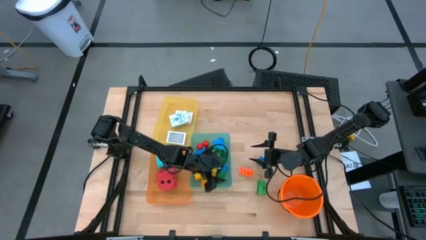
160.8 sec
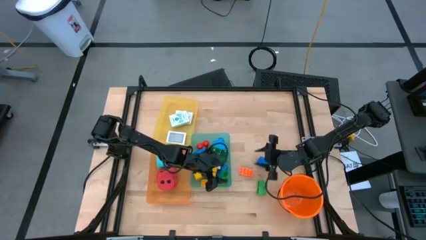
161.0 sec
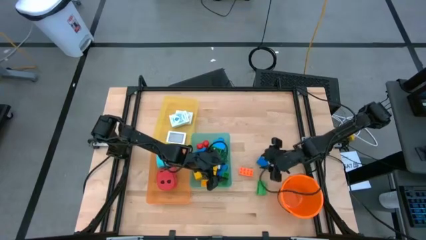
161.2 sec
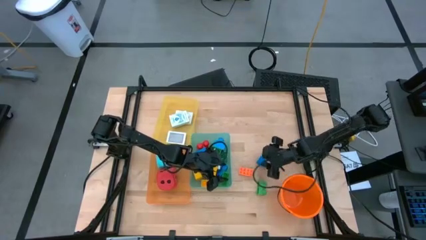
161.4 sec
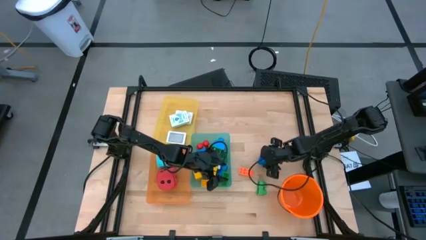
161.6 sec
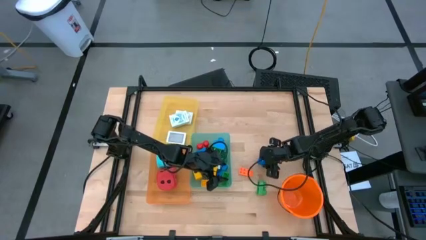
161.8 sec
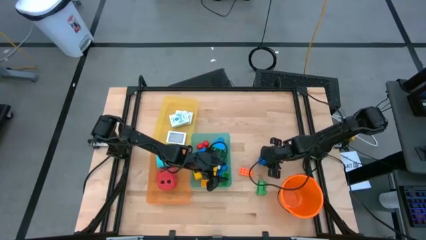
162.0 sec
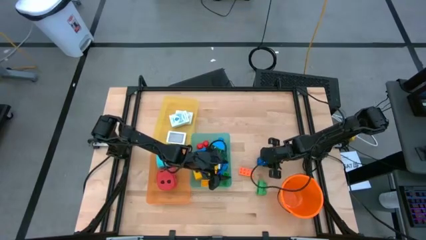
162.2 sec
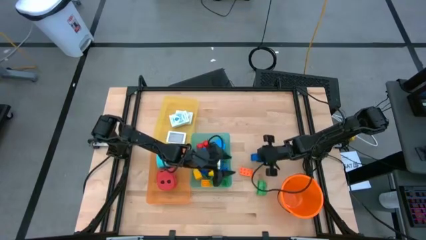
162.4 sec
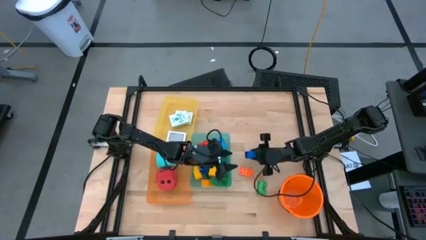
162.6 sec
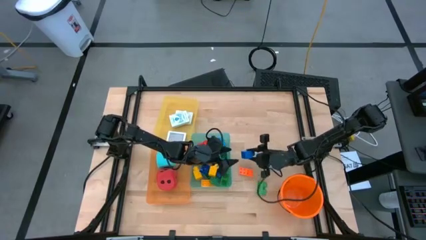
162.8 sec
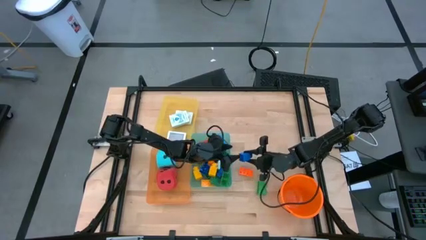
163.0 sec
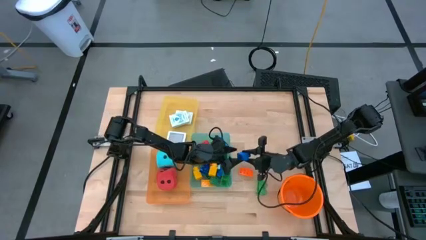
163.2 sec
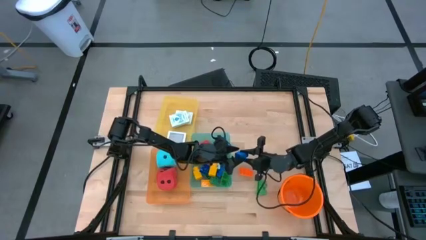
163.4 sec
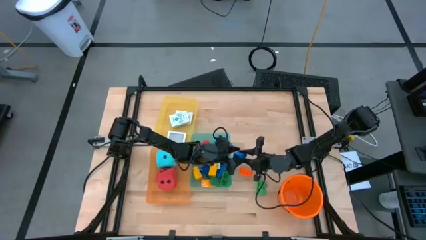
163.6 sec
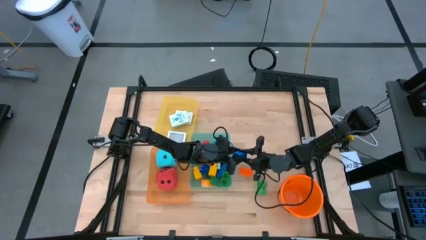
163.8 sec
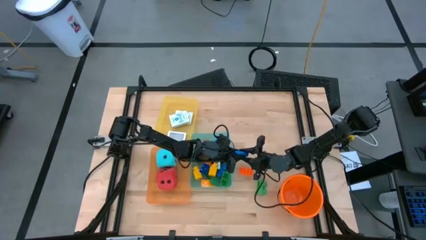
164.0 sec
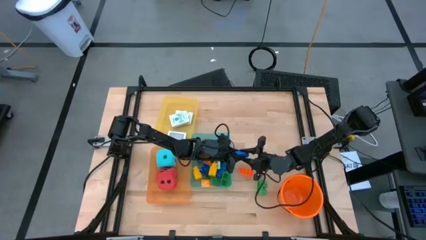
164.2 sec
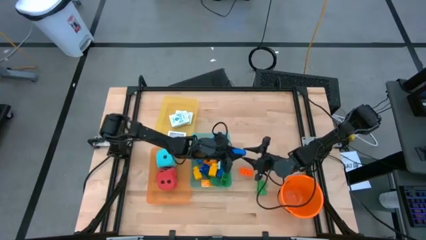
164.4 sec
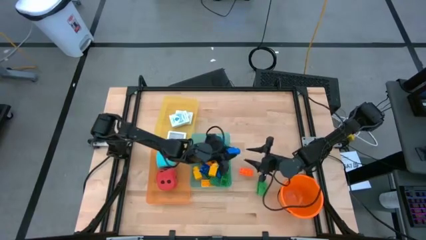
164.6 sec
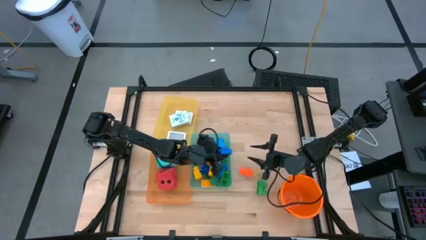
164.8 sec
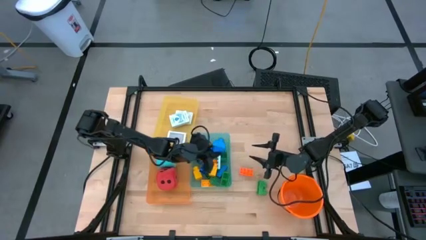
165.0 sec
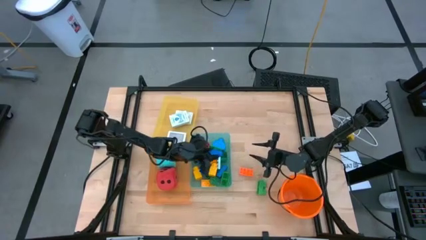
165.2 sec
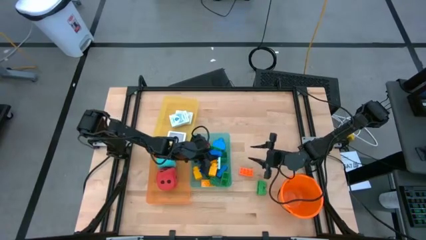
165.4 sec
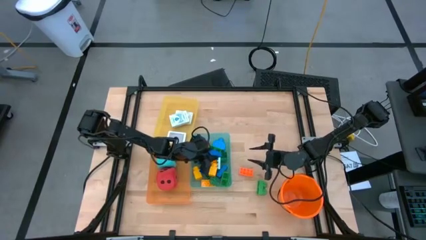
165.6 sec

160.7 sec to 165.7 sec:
Task: Pick & Place Toys
Put the blue game piece into the green bin

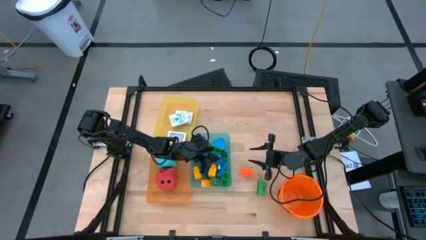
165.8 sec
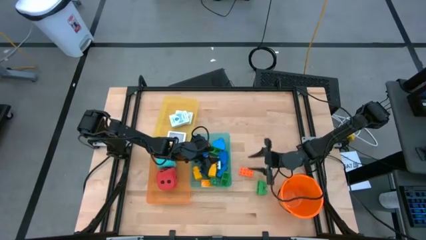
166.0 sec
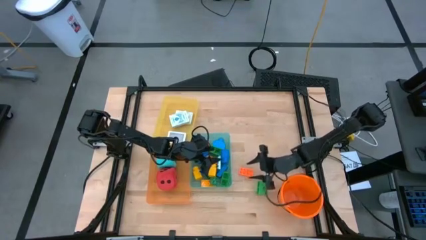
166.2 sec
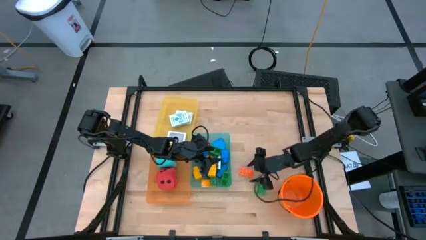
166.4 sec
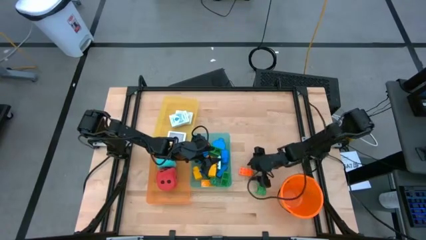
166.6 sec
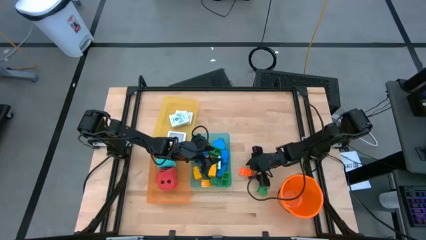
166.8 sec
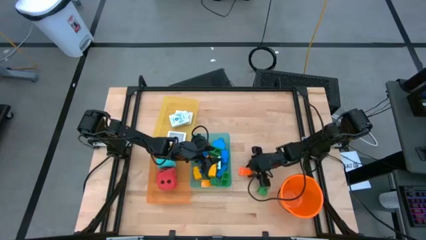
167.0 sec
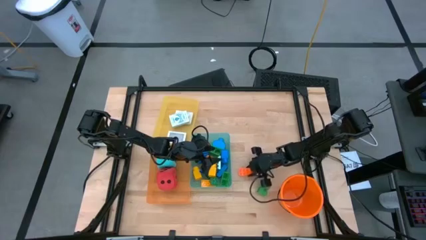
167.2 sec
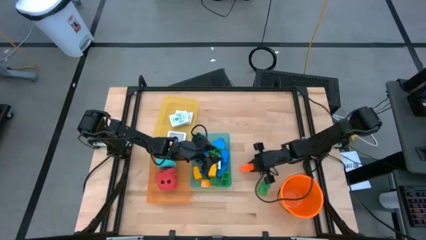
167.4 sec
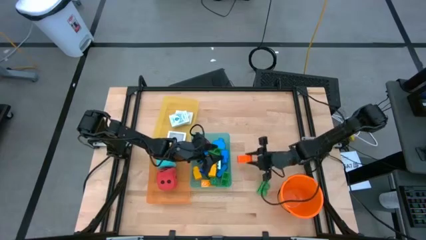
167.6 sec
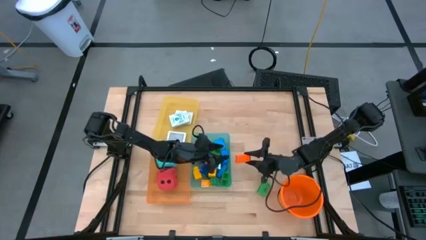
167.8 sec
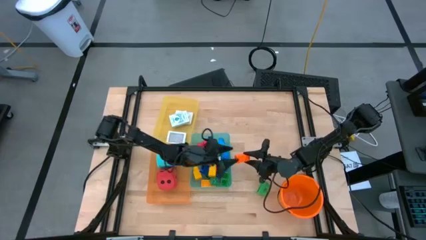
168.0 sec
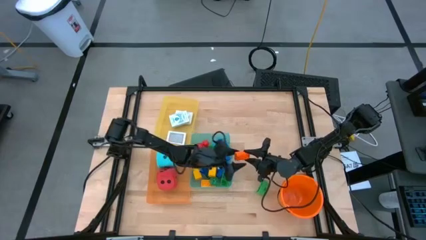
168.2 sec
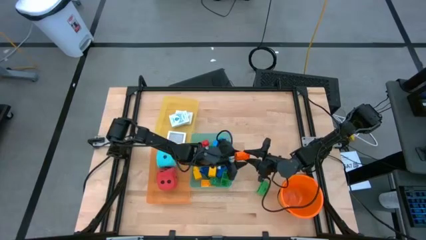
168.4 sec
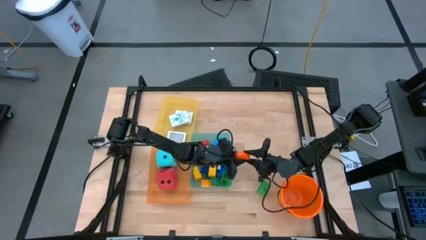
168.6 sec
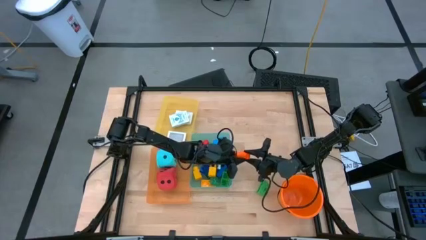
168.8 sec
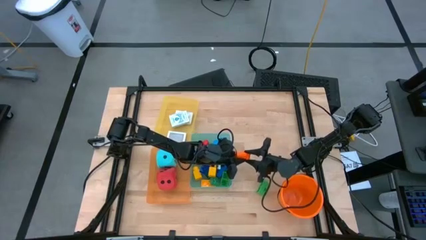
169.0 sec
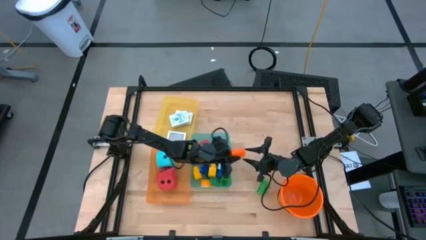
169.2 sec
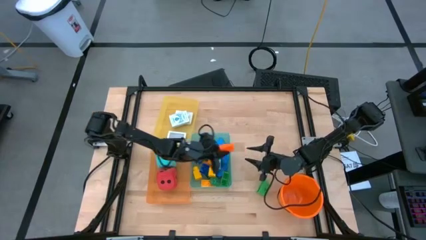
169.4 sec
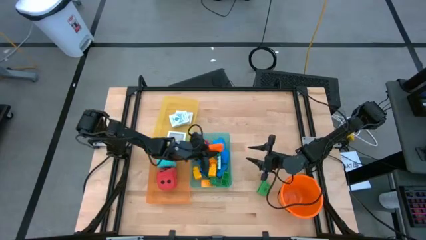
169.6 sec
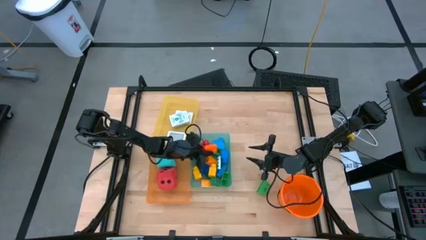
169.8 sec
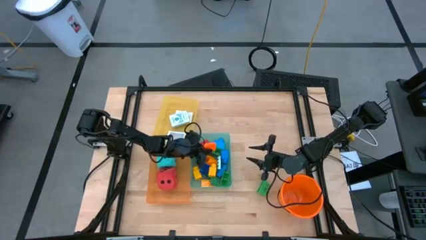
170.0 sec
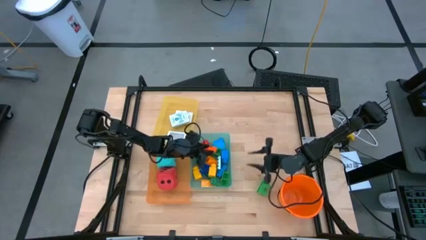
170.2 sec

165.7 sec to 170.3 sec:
Put the orange game piece into the green bin

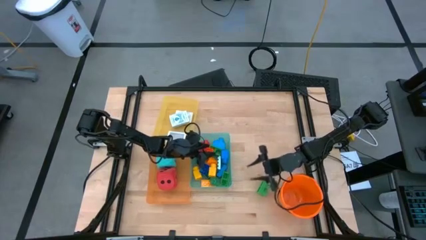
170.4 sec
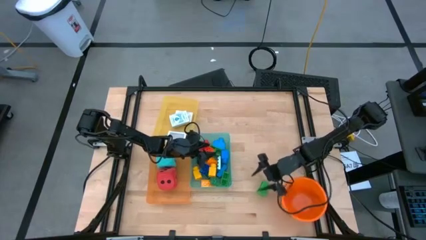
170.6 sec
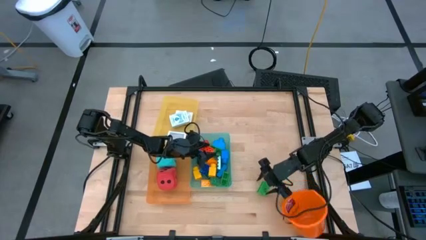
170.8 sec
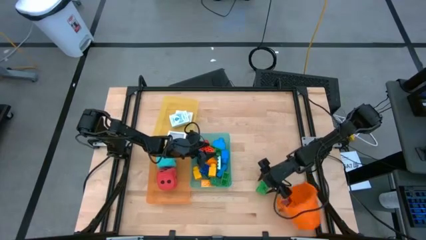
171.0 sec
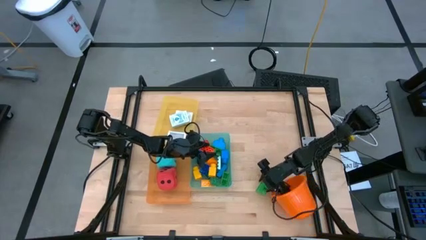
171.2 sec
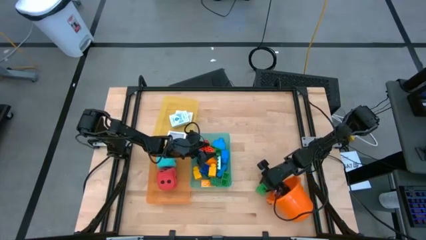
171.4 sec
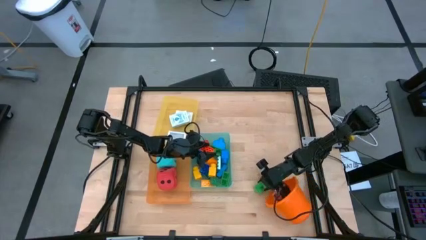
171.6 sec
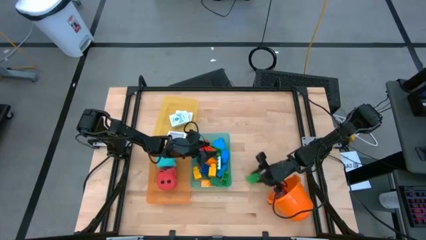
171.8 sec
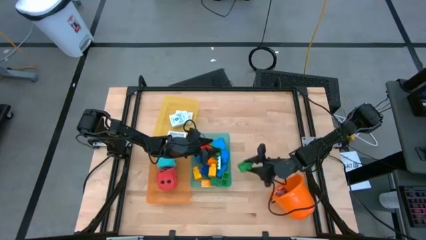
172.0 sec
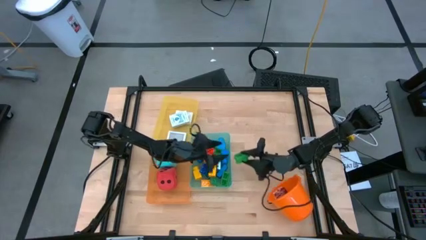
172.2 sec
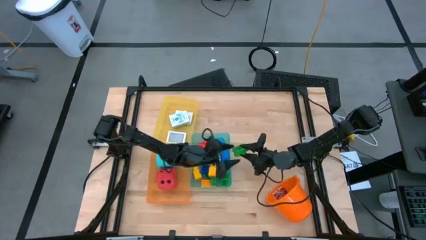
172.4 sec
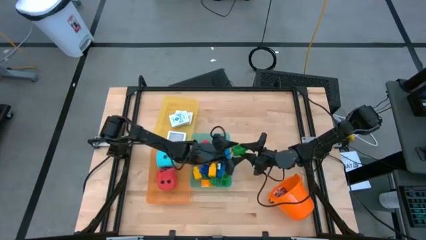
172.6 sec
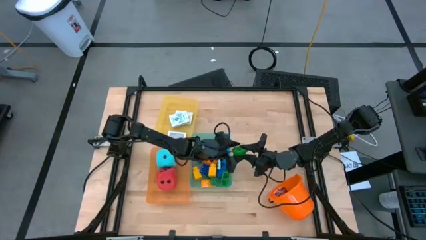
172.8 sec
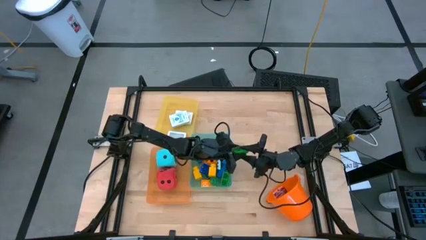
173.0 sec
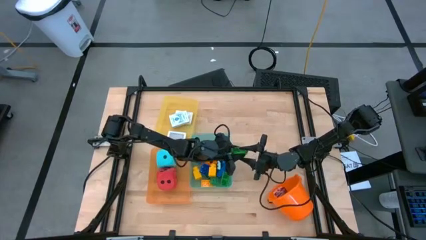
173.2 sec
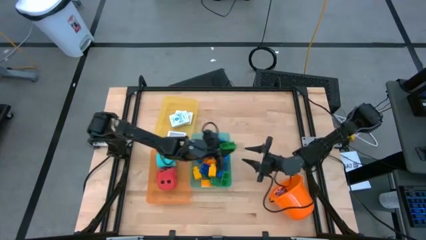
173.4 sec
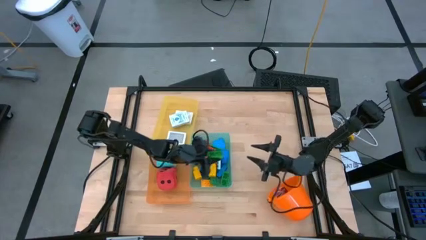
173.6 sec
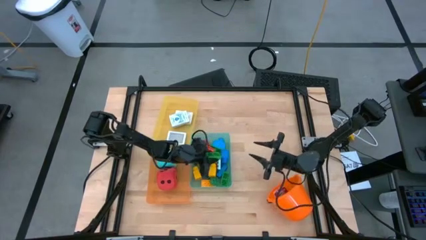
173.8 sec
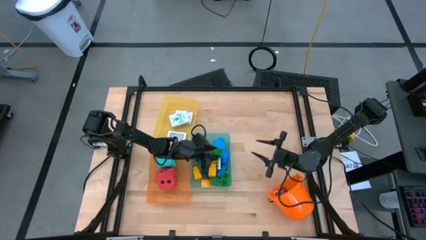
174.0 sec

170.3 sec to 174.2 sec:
Put the green game piece into the green bin

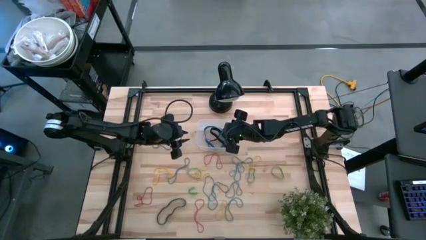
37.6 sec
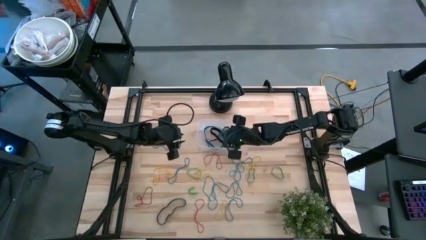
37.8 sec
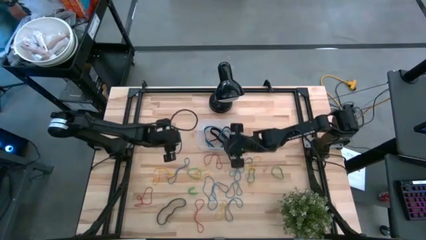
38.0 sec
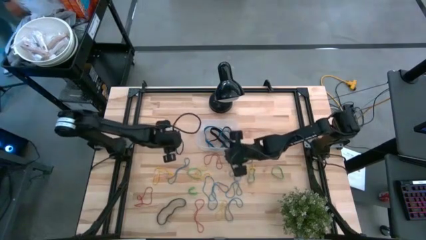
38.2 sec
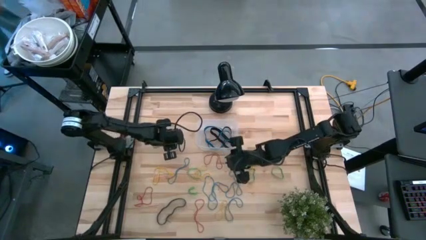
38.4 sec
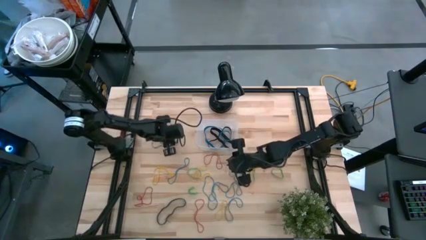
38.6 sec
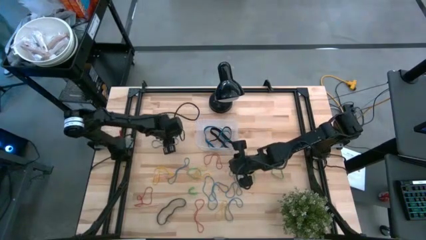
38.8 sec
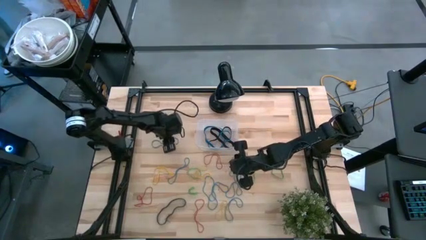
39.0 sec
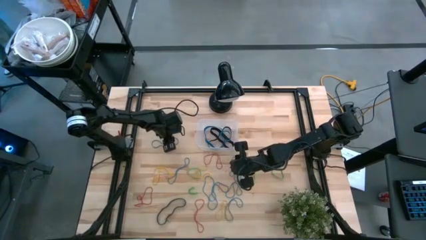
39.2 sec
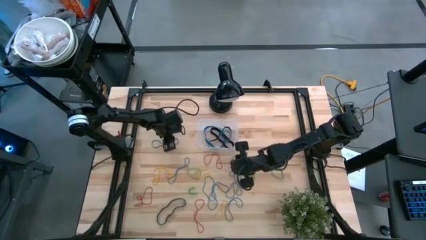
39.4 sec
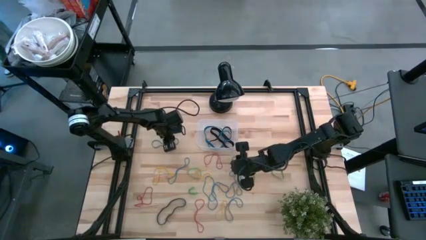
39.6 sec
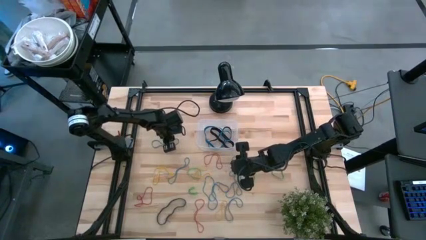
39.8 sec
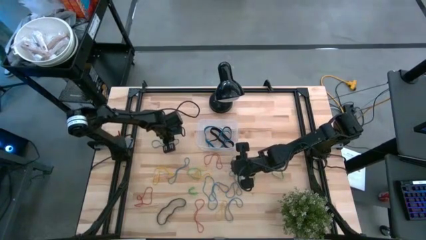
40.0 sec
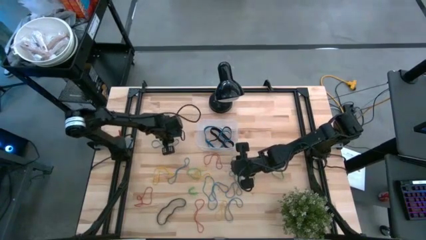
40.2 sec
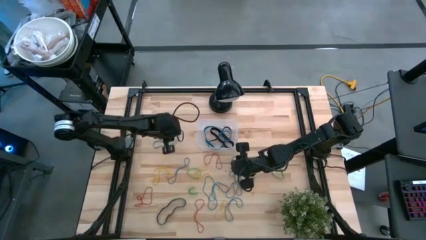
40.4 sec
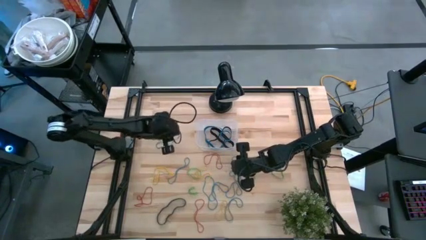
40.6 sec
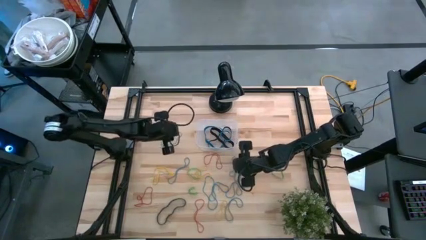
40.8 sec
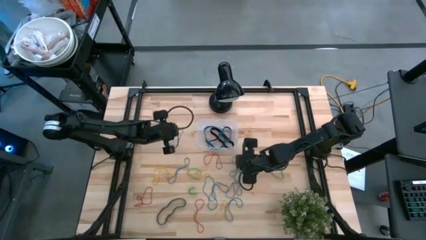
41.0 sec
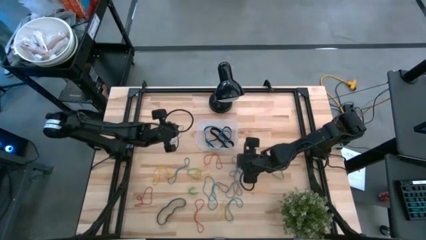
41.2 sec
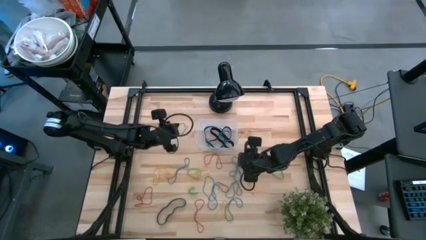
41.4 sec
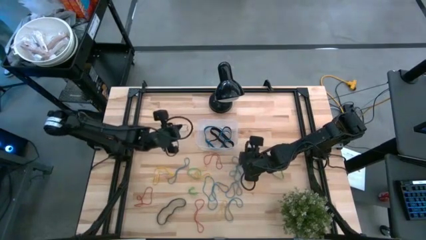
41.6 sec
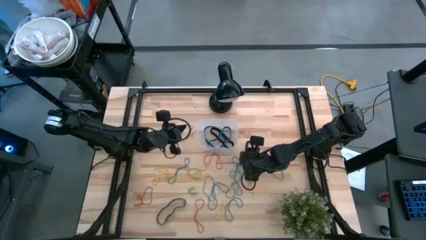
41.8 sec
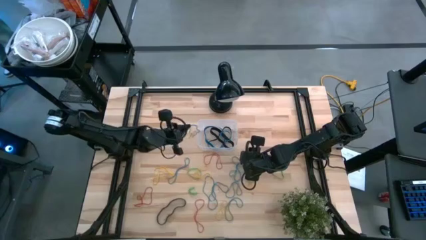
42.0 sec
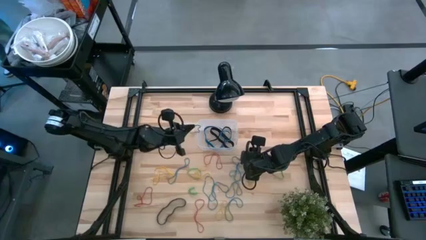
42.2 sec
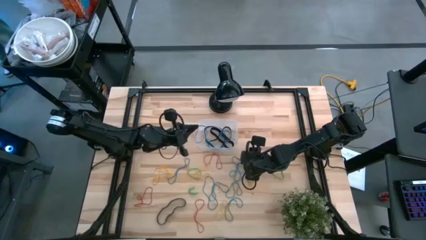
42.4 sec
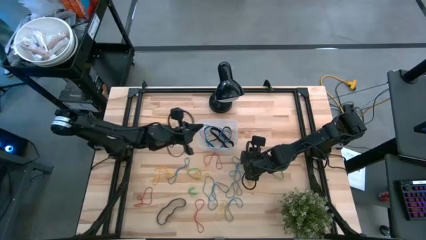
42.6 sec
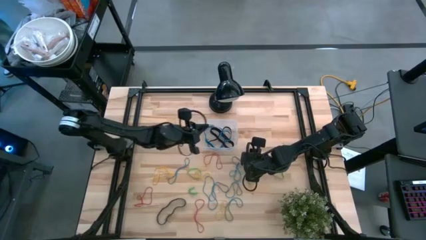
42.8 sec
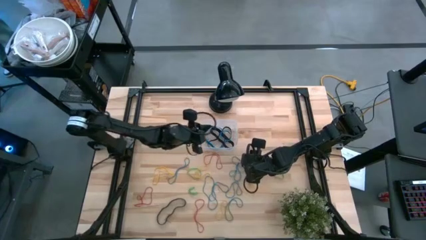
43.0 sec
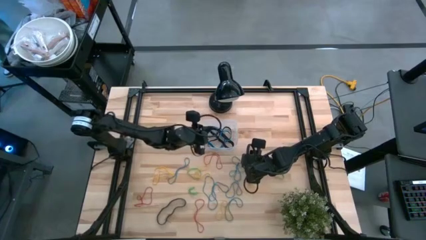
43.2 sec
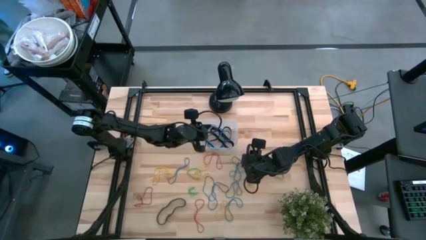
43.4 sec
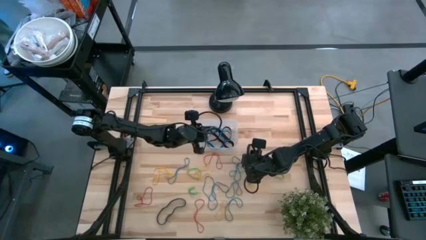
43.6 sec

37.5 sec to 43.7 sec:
Task: Pick and place rubber bands into bin
Put the blue rubber band into the transparent bin
